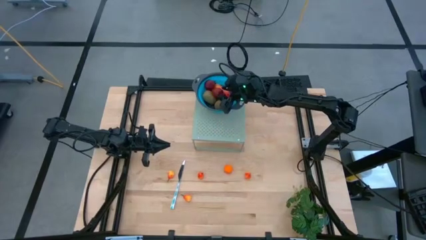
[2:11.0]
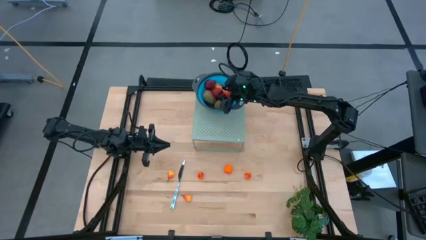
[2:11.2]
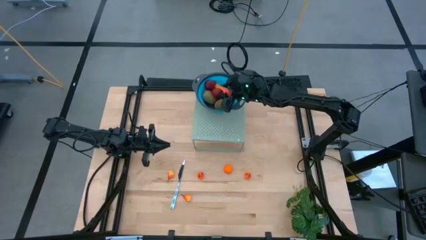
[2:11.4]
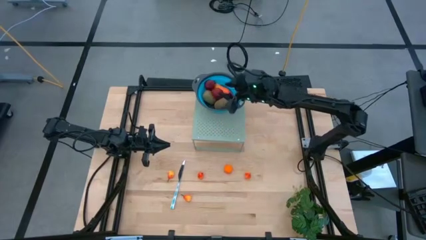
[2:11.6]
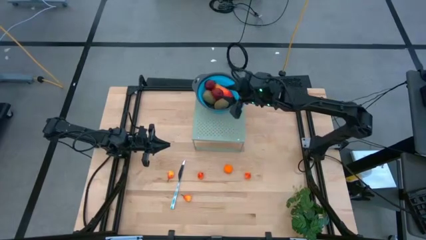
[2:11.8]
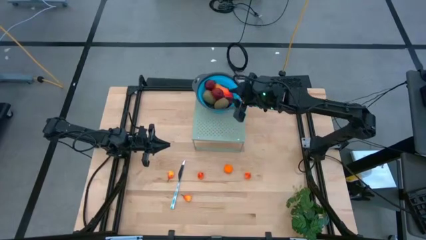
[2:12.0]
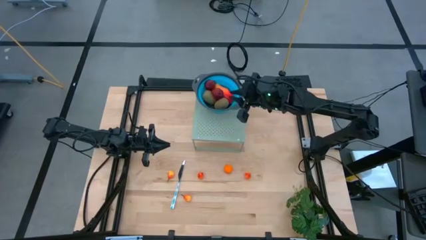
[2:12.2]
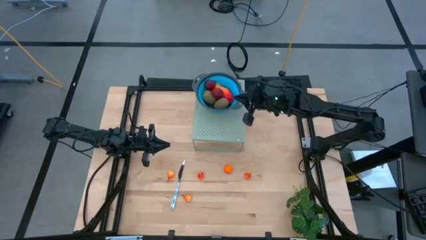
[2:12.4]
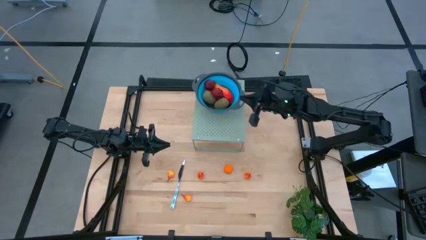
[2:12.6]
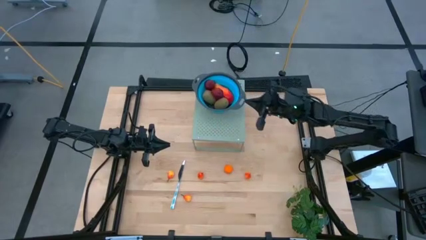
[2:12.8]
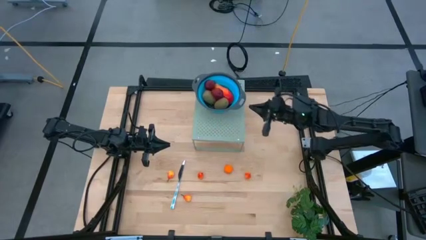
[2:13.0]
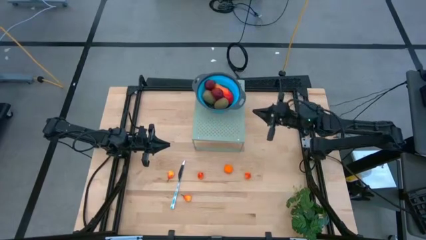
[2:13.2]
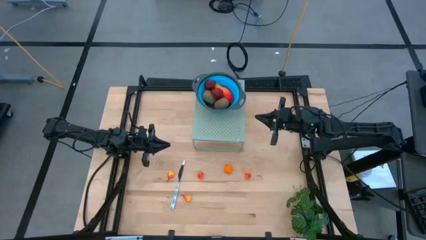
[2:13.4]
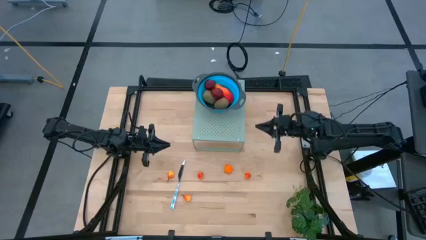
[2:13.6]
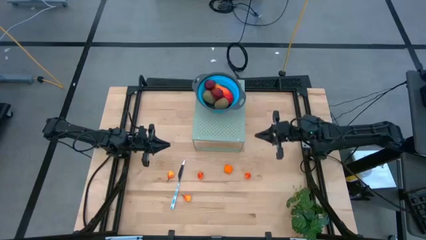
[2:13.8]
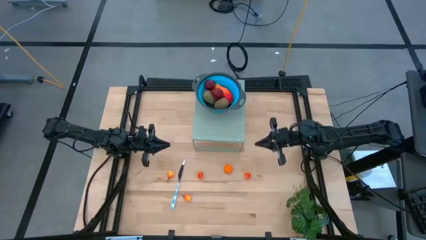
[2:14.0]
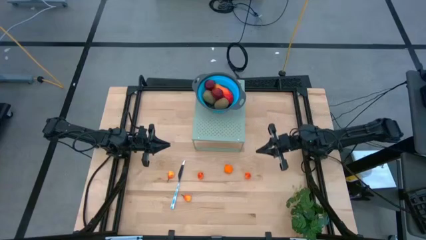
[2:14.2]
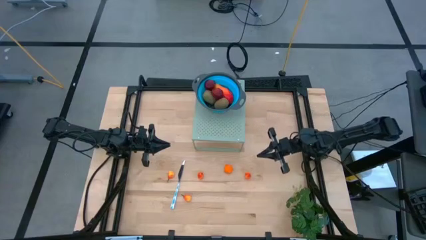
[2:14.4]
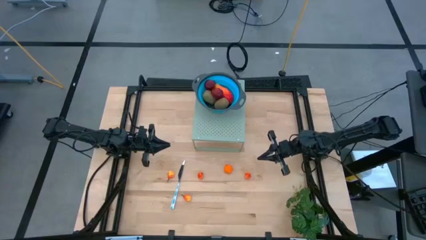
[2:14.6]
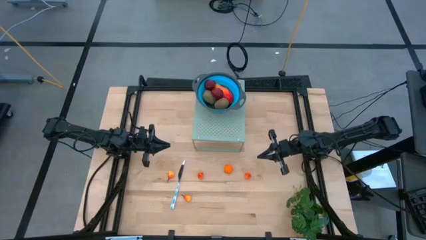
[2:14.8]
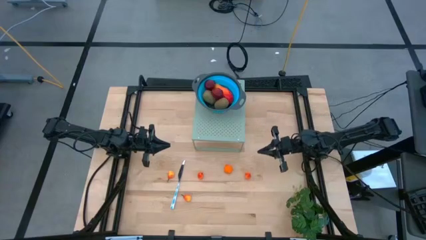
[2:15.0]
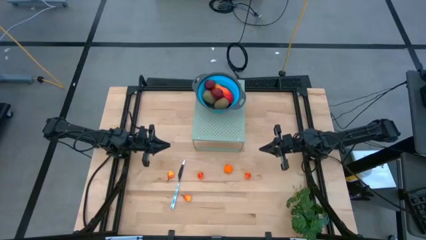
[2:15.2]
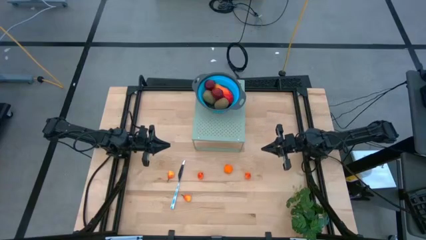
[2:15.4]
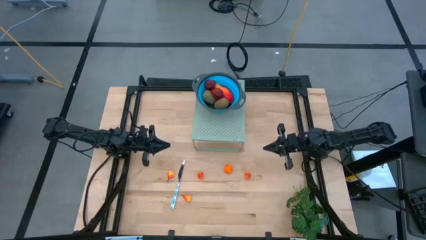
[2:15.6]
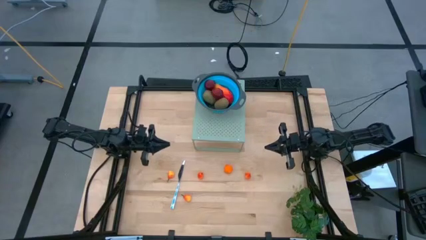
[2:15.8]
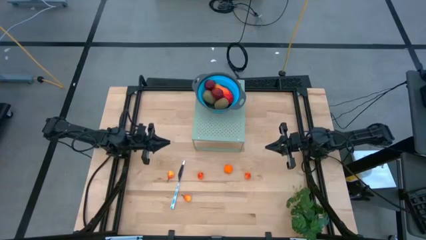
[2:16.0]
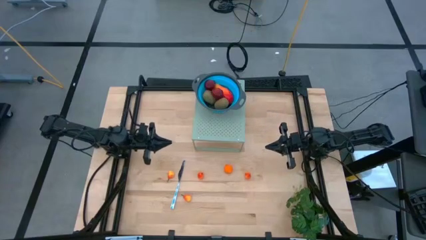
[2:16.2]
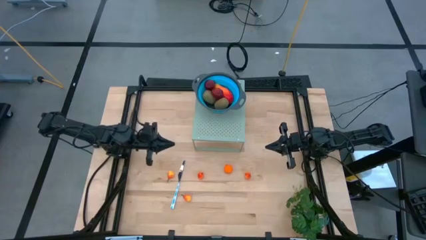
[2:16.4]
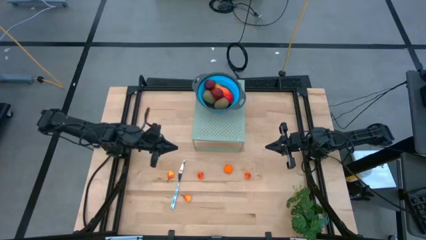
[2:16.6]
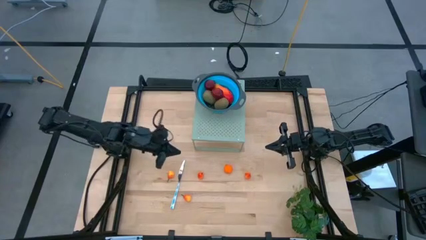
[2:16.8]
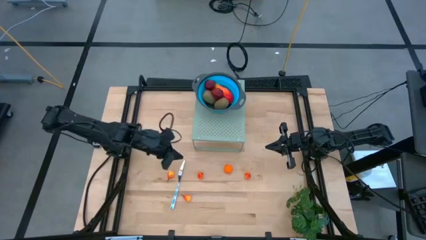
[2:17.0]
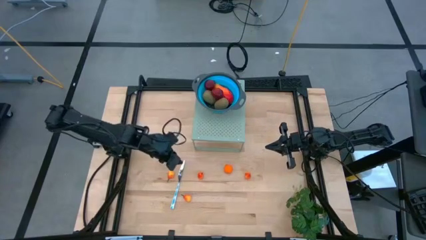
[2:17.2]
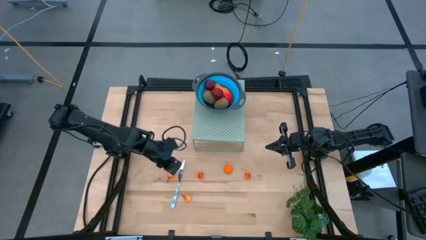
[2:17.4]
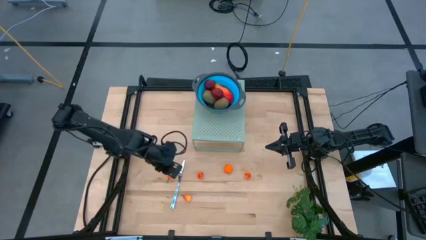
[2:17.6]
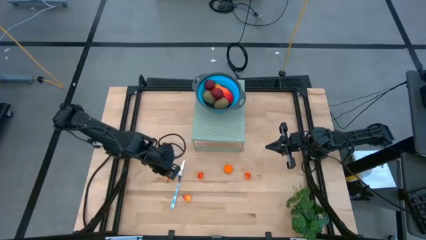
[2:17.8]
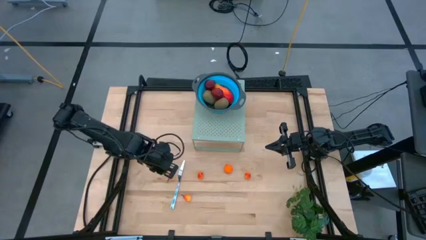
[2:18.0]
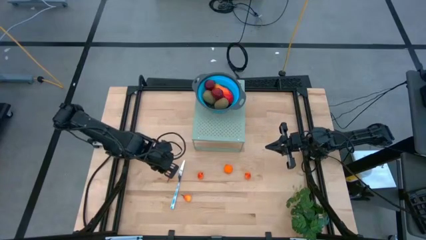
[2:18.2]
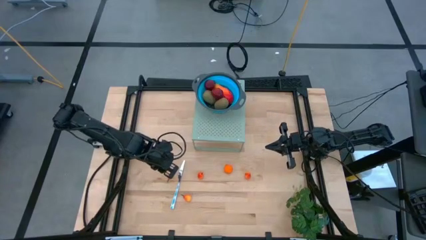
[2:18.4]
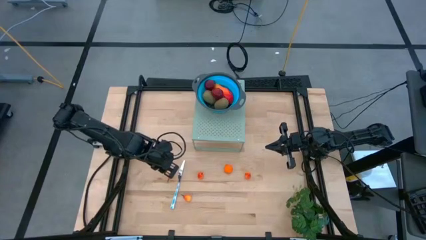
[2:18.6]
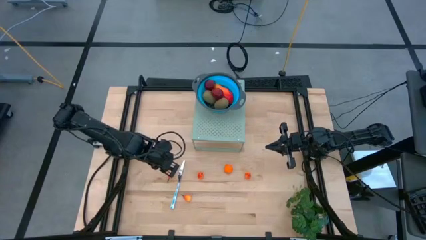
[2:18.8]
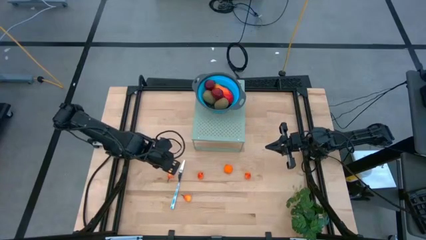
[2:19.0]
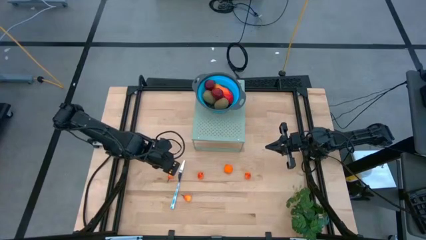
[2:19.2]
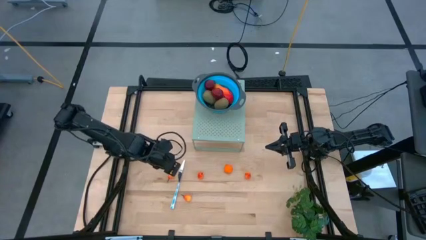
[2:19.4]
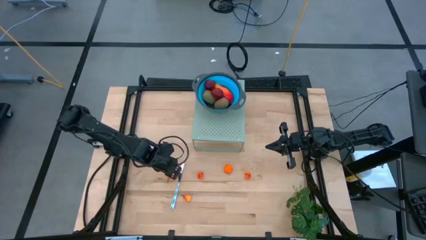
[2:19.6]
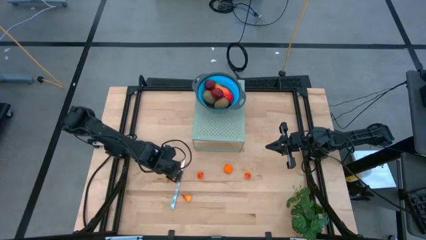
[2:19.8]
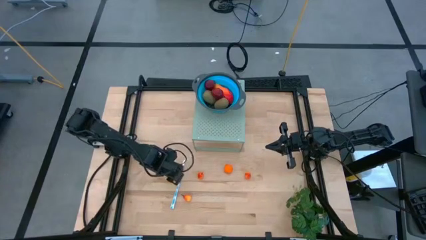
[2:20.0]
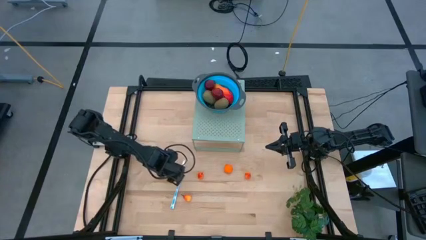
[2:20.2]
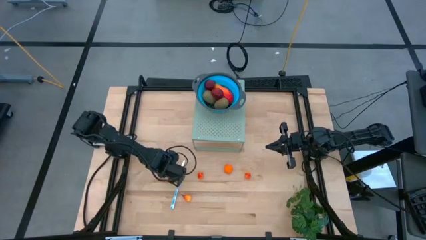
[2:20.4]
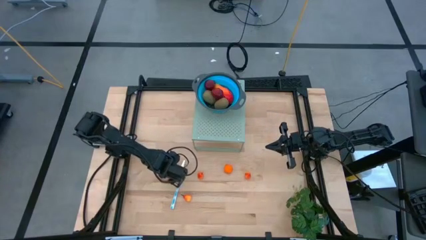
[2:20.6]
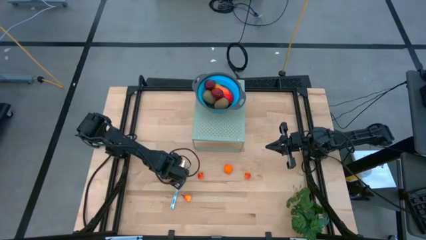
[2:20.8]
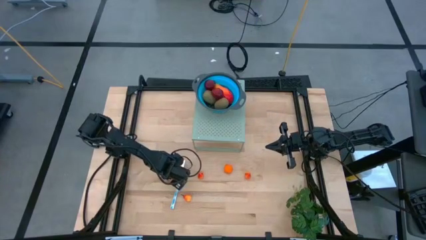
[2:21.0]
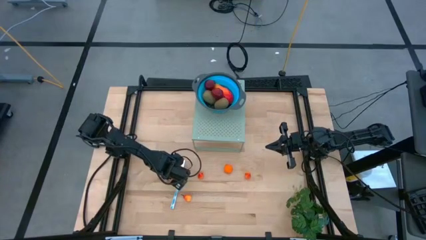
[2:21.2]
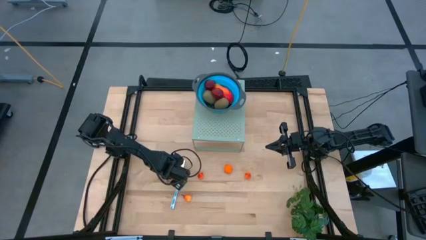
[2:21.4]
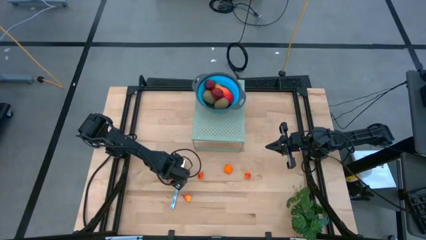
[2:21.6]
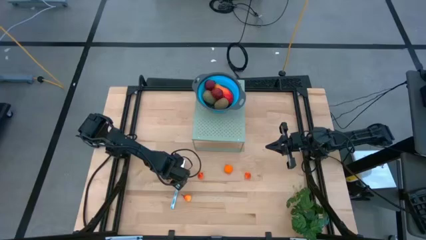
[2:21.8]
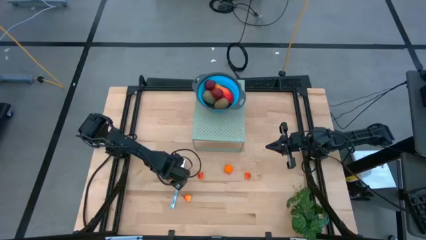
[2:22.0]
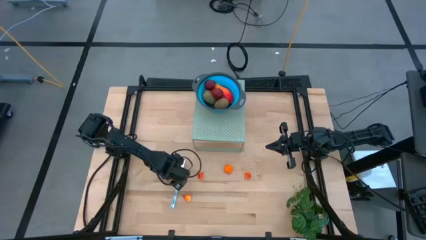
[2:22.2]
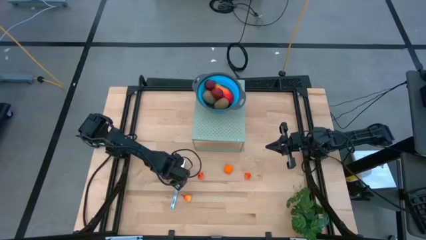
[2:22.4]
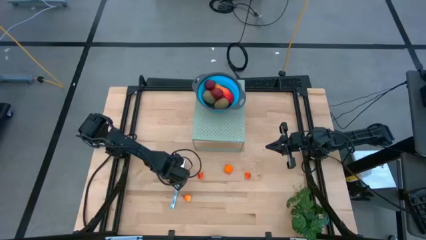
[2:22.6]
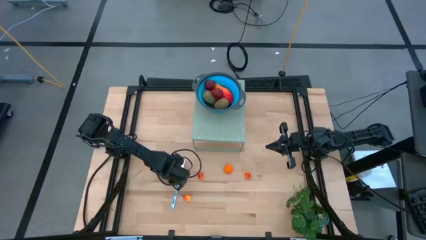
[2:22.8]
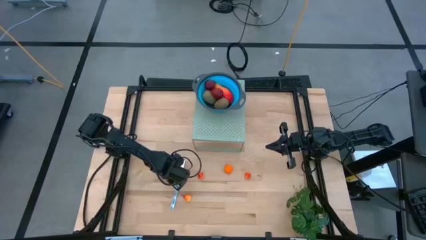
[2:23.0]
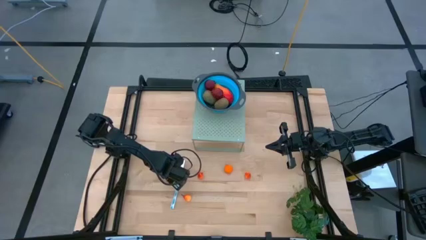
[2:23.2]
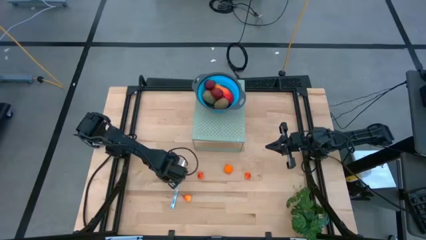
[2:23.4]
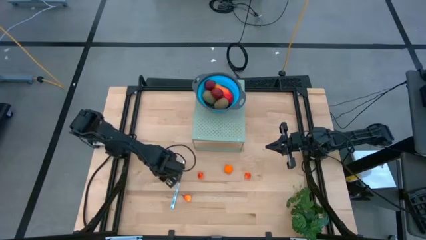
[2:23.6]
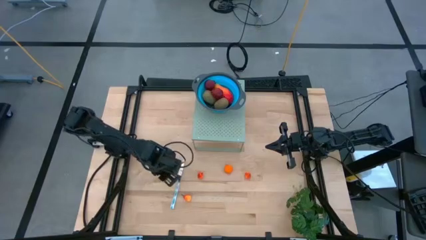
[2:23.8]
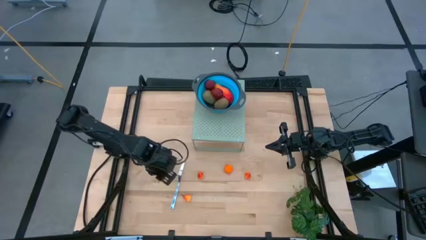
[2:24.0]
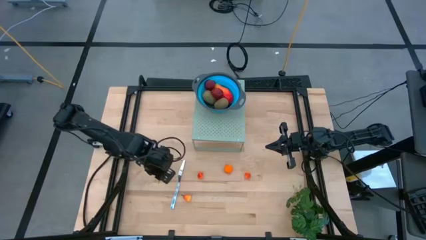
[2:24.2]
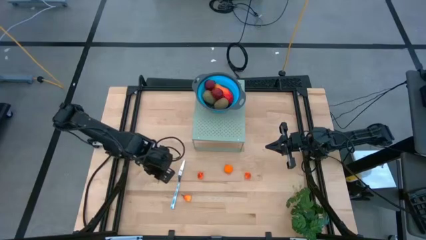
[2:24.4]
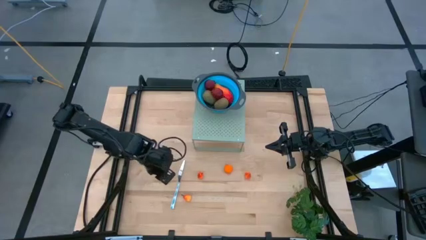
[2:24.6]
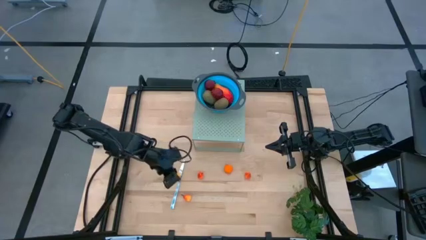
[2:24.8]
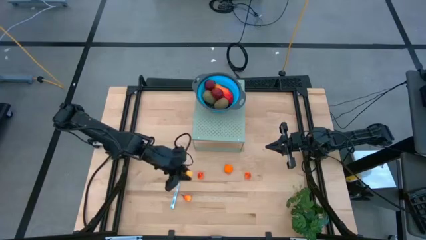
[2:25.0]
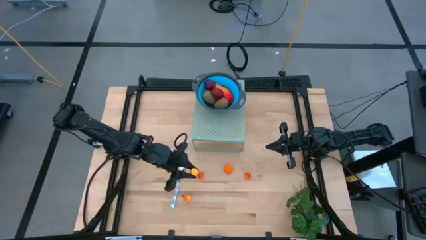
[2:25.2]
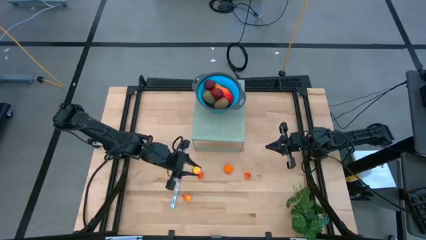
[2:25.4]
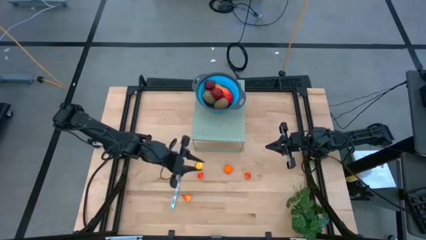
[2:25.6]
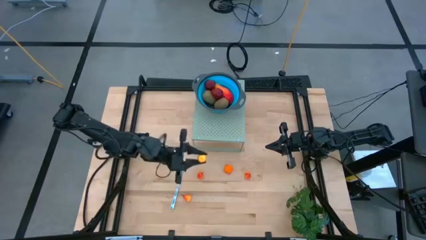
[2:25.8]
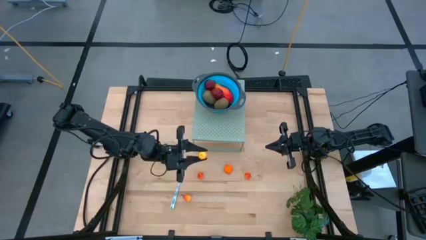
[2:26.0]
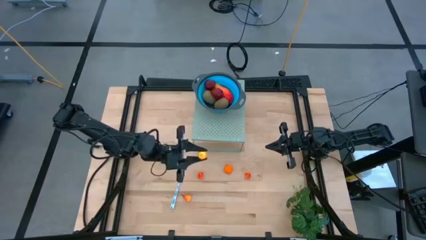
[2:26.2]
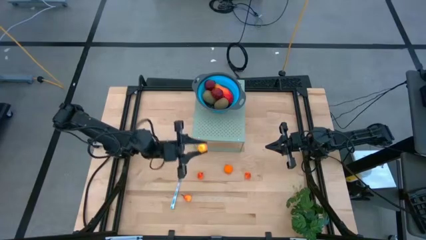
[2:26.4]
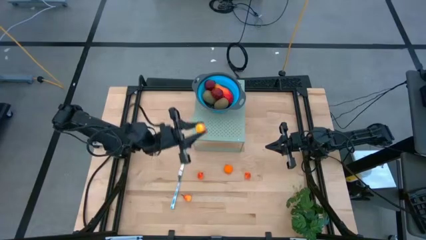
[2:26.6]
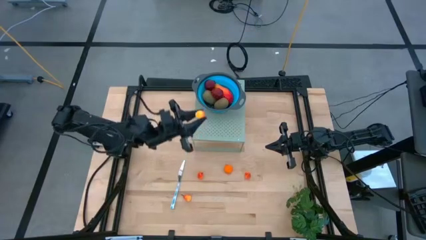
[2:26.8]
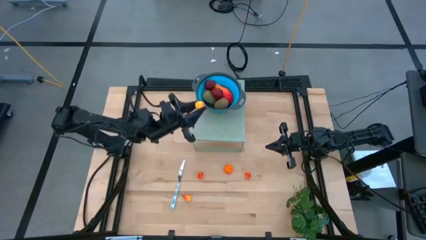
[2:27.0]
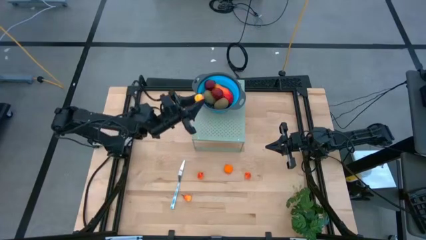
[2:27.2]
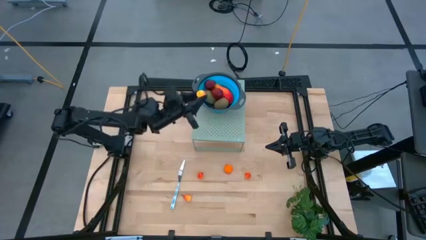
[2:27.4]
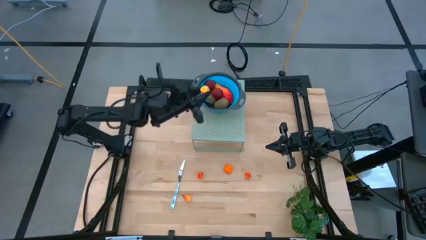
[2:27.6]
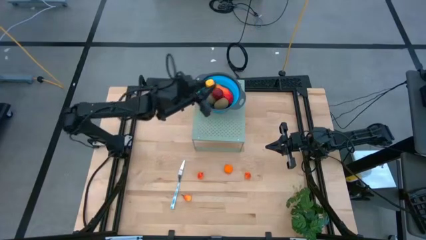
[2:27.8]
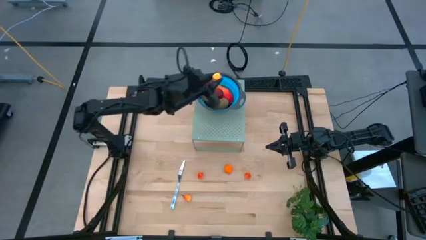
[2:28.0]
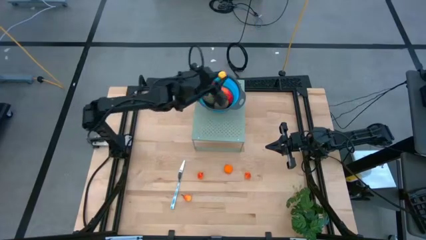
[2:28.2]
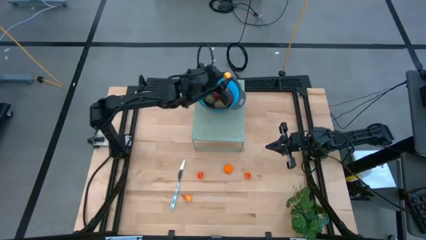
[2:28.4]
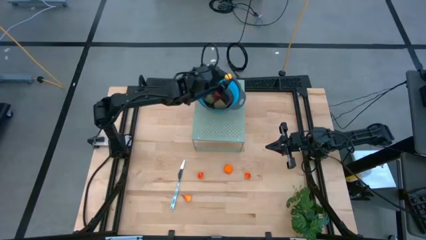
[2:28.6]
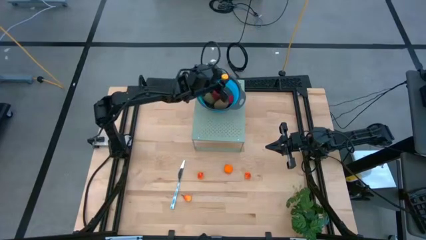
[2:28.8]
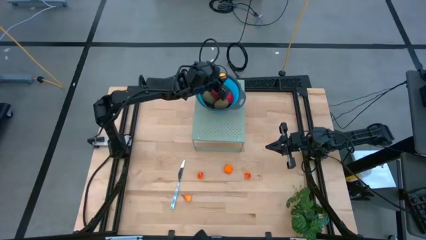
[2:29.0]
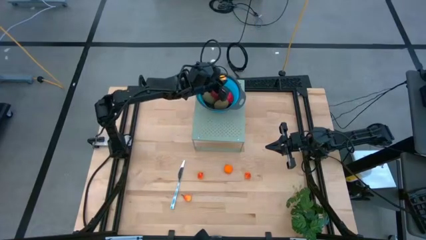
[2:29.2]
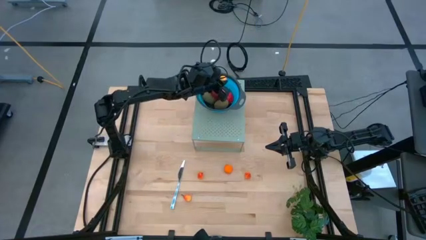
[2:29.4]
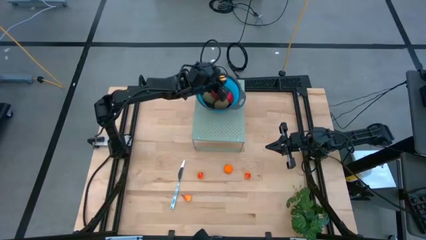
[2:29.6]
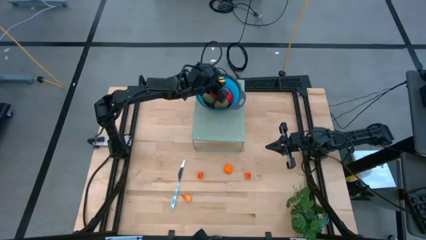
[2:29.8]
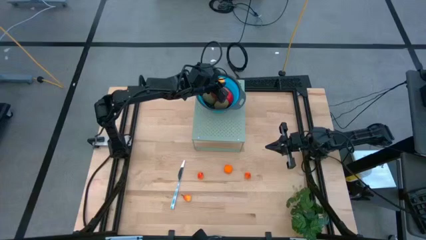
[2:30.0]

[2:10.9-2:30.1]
Task: Pick & Place Fruit
Put the left Pear into the blue strainer bowl on the shelf
